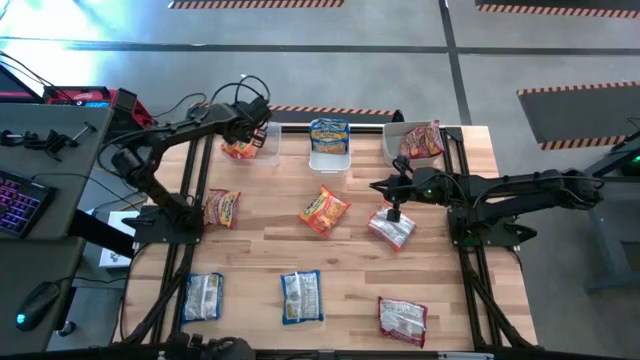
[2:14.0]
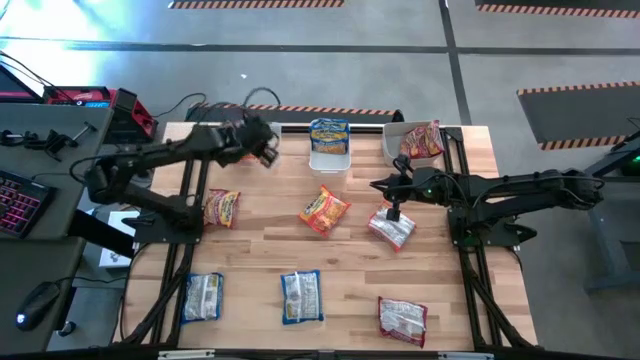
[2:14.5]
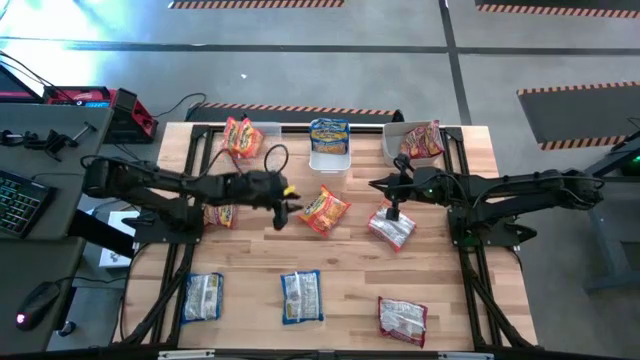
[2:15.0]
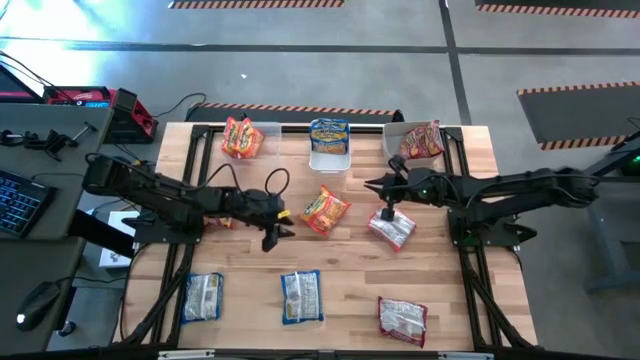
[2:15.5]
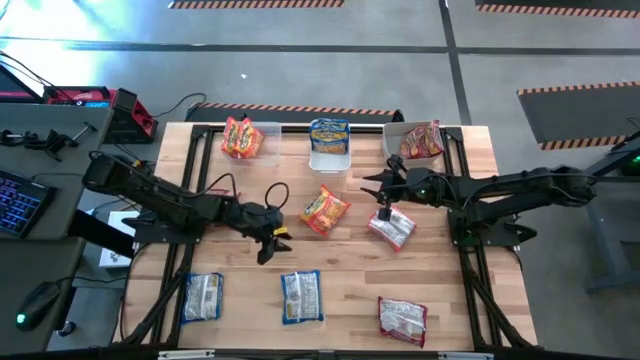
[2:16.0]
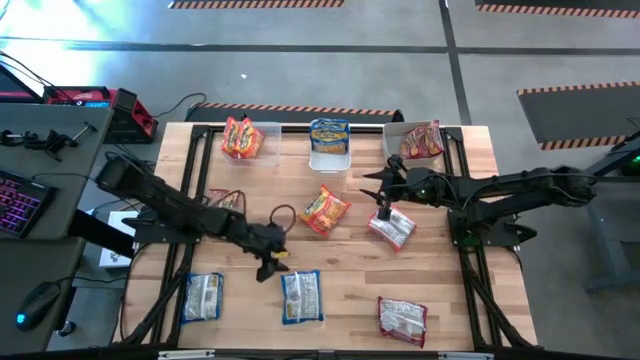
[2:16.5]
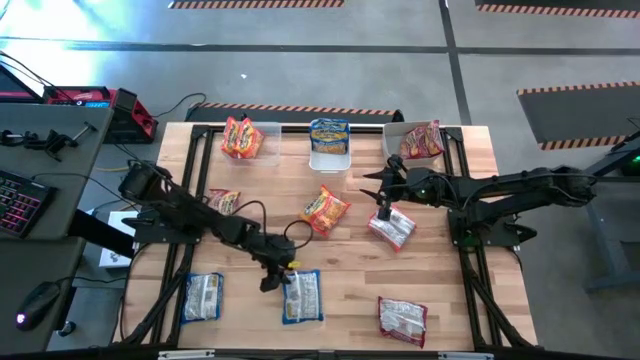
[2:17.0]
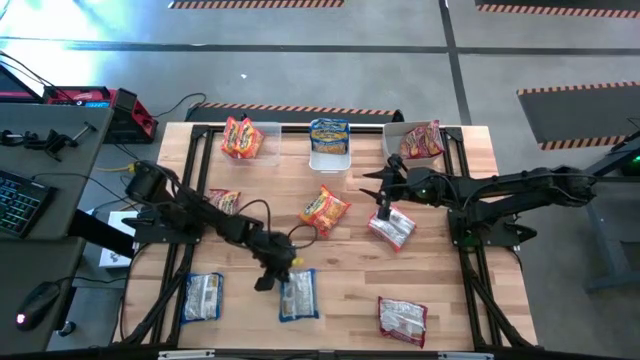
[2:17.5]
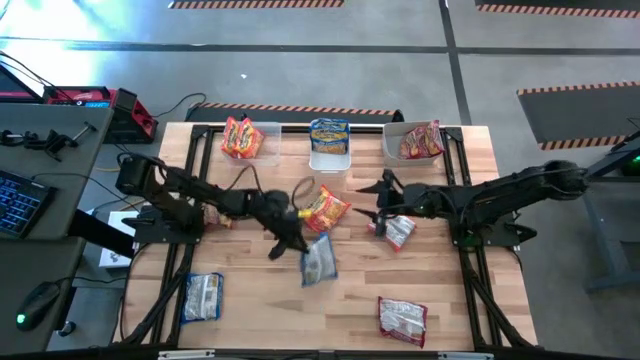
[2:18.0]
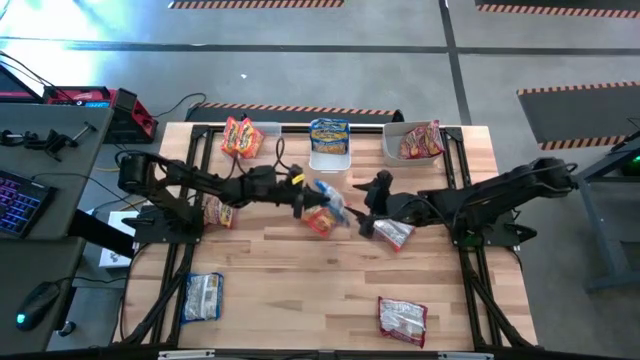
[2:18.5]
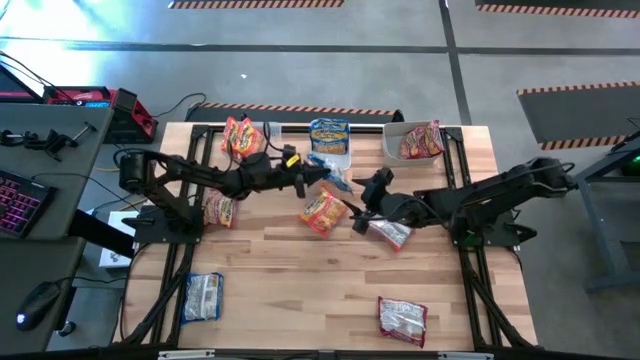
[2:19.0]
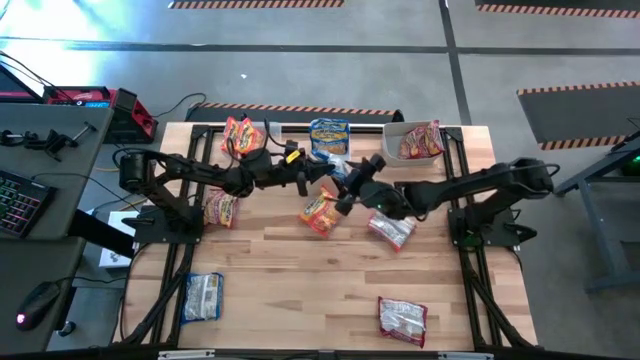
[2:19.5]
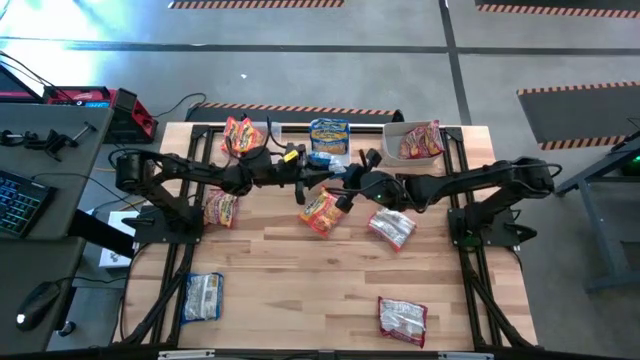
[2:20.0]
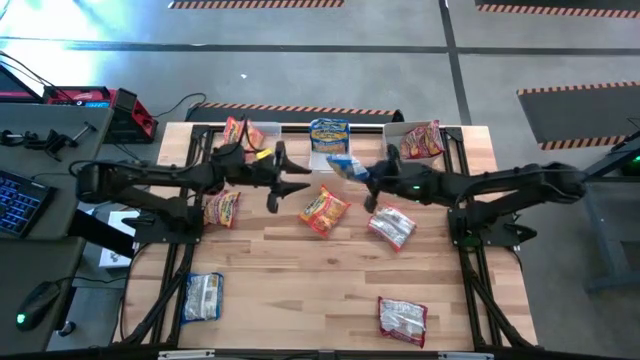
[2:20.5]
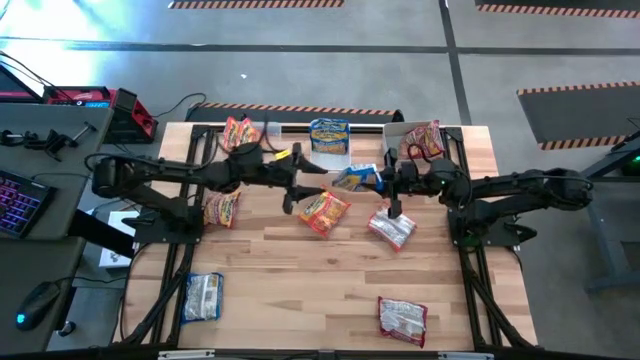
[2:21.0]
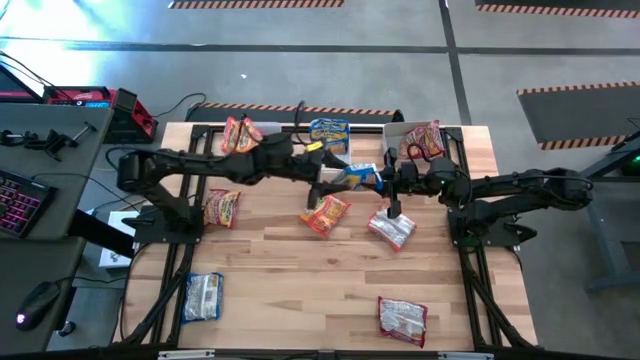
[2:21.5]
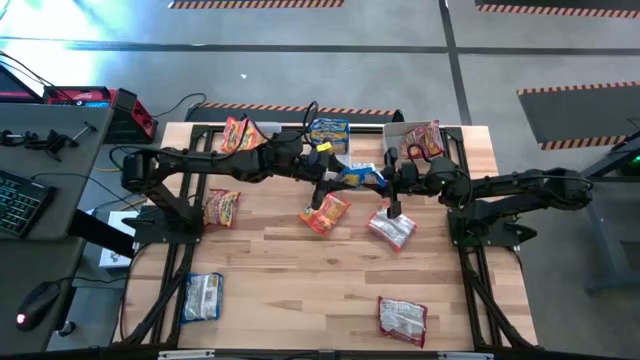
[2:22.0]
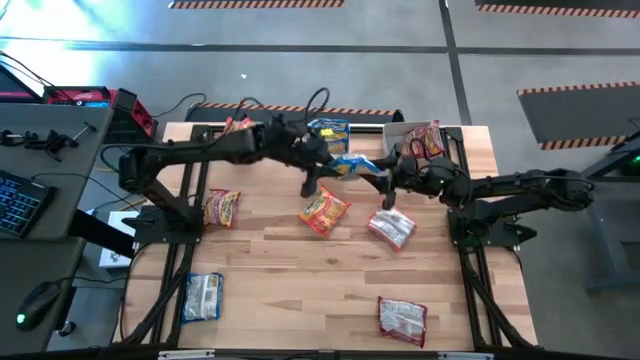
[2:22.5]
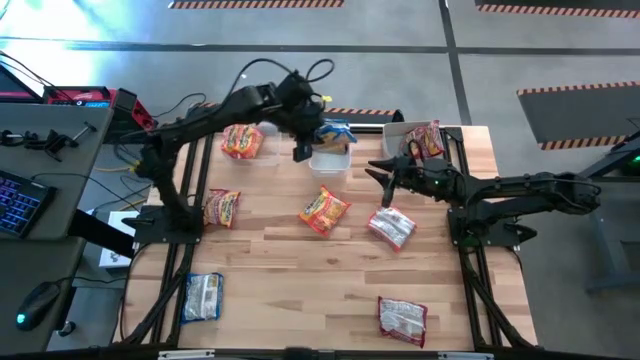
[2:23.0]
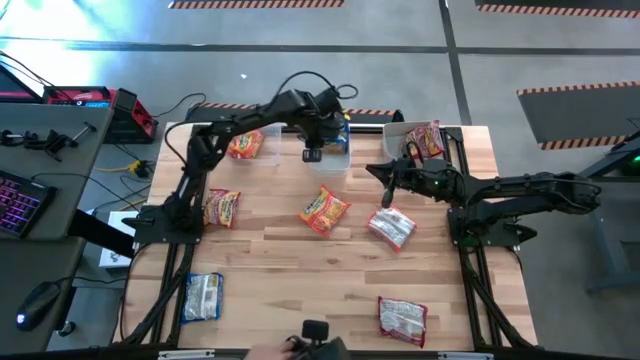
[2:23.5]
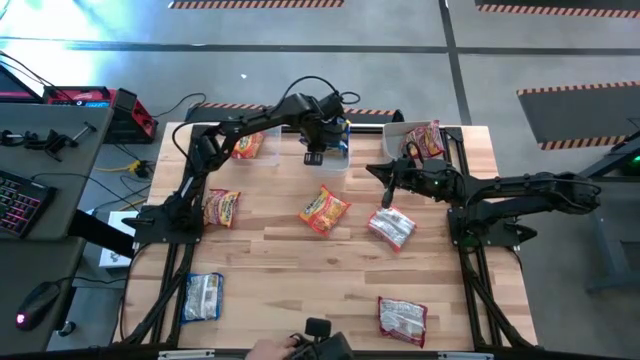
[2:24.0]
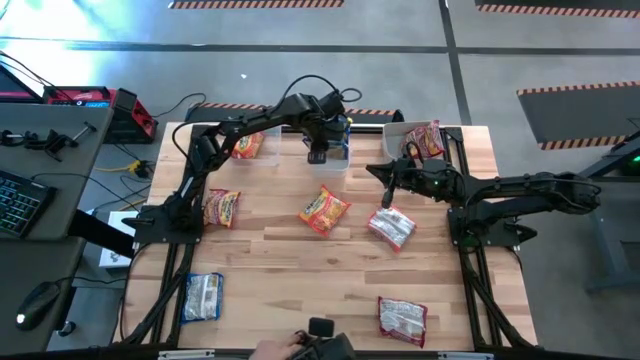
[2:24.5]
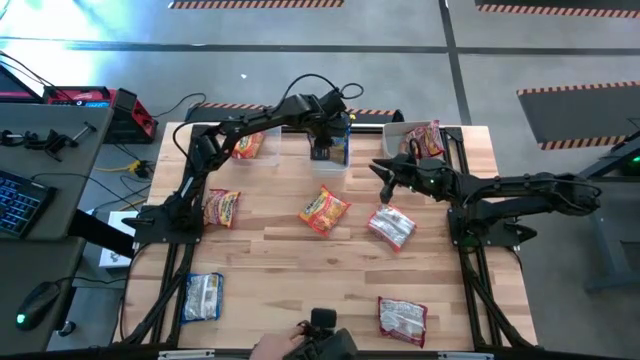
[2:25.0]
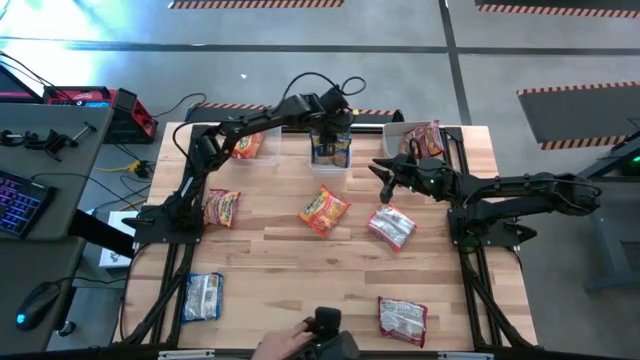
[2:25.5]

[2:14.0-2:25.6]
Task: Sort Maruchan noodles
Put the right blue noodle pack into the white bin

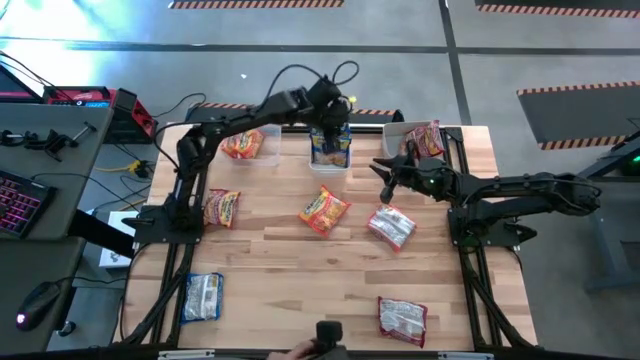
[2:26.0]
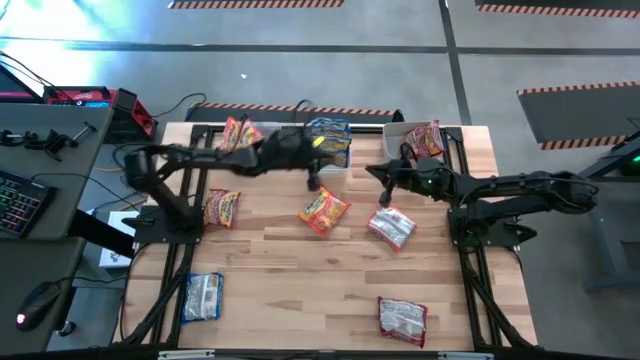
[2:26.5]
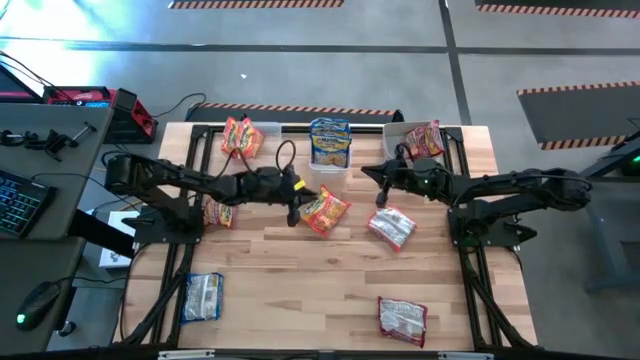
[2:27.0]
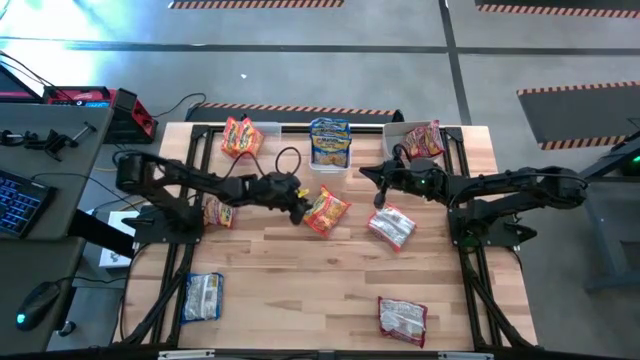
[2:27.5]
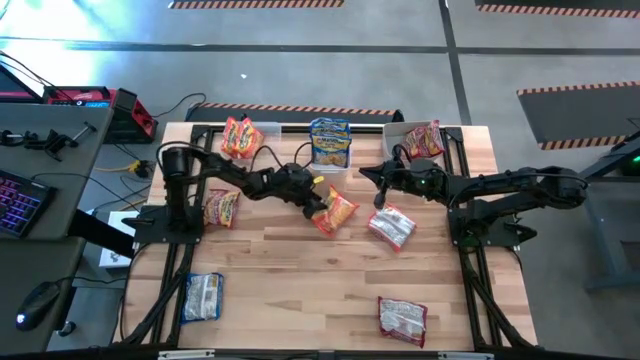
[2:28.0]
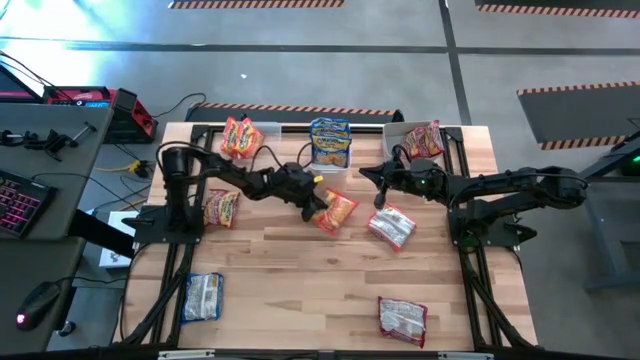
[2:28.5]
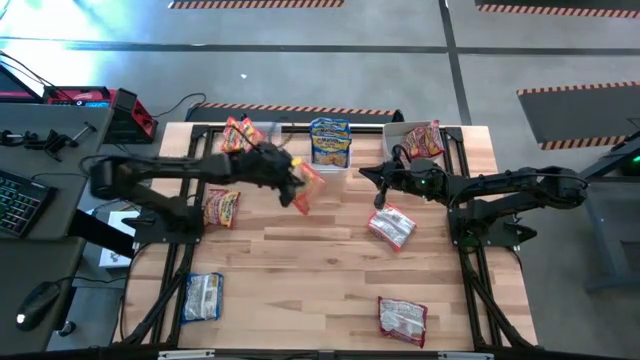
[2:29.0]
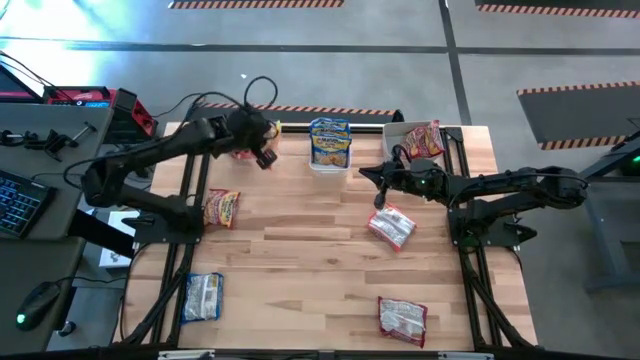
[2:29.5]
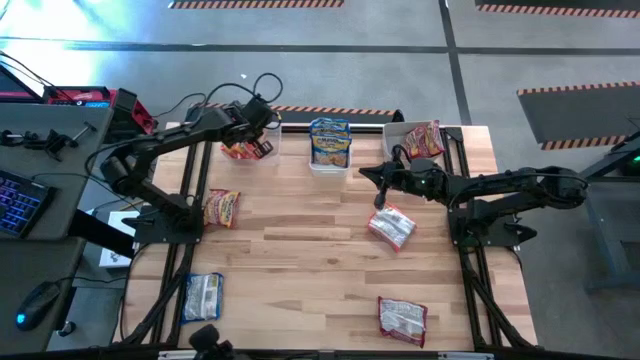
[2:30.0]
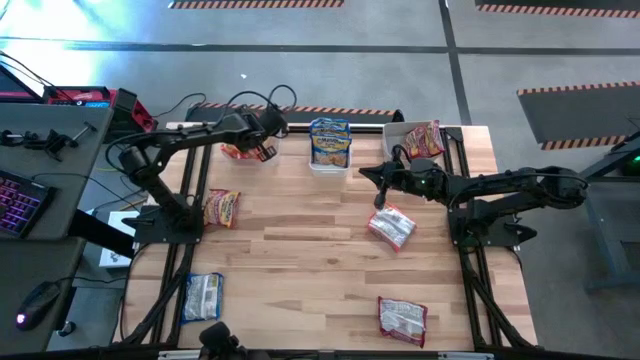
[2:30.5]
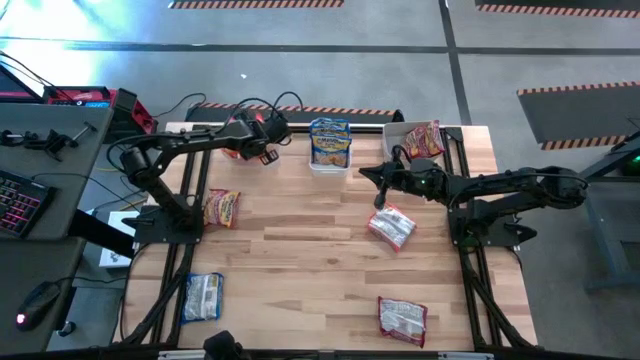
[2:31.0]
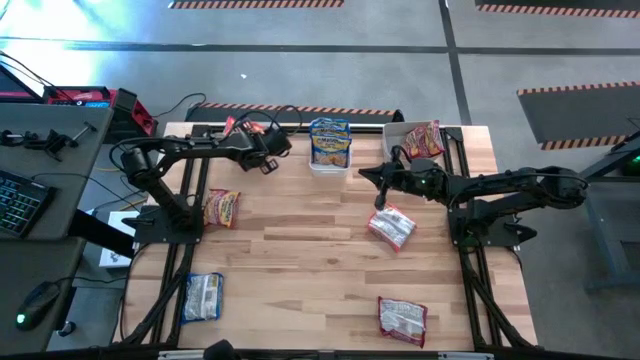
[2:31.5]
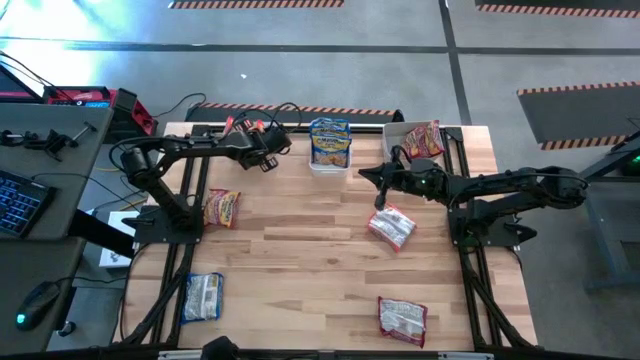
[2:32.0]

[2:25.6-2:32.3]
Put the left orange noodle pack into the transparent bin

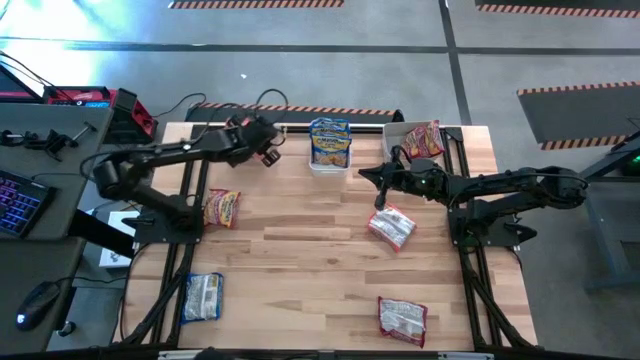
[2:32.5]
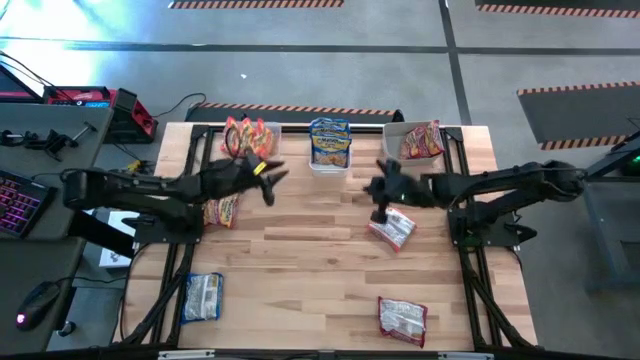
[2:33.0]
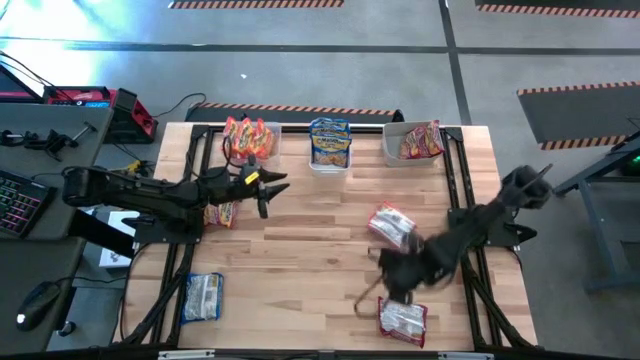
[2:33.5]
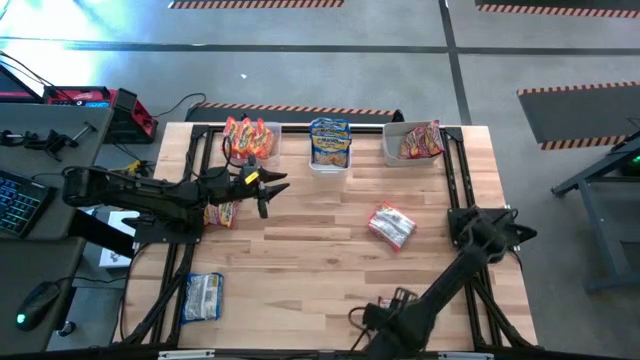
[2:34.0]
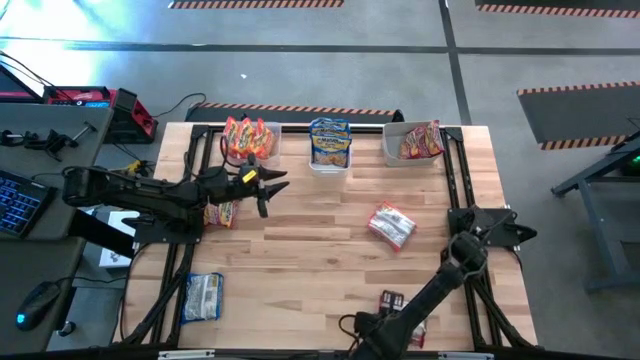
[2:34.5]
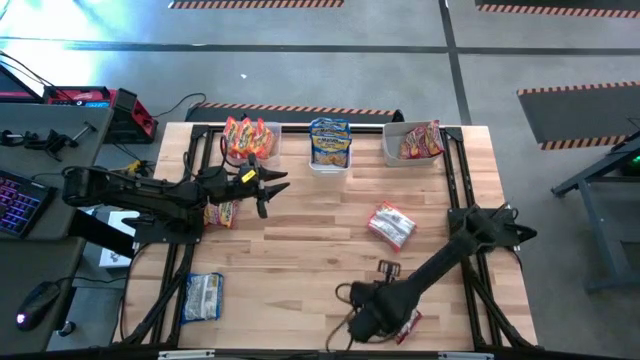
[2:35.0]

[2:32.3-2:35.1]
Put the bottom red noodle pack into the gray bin
